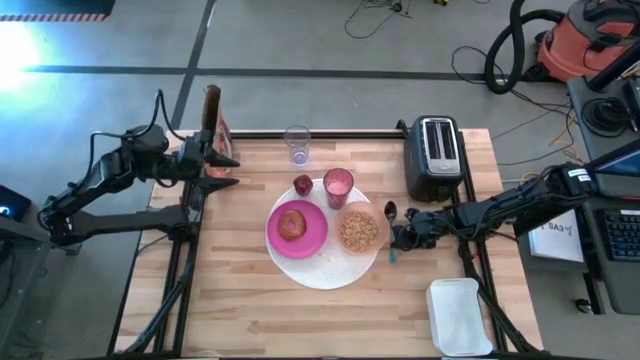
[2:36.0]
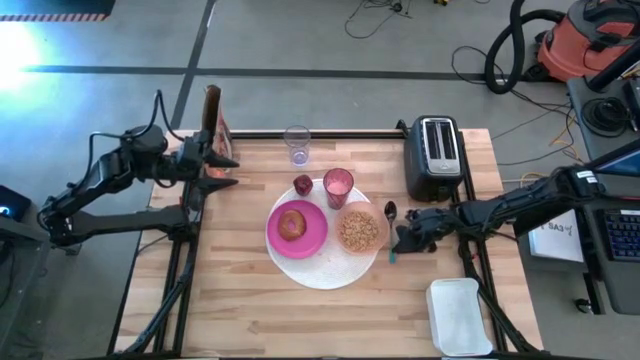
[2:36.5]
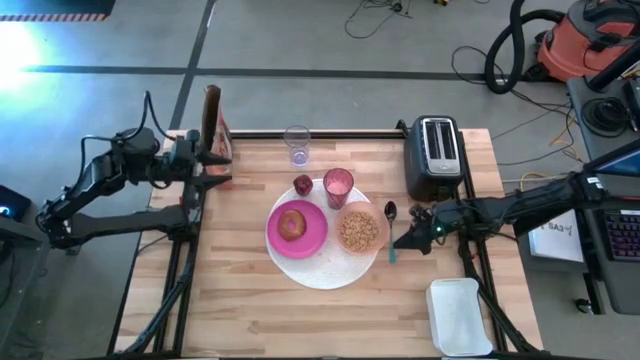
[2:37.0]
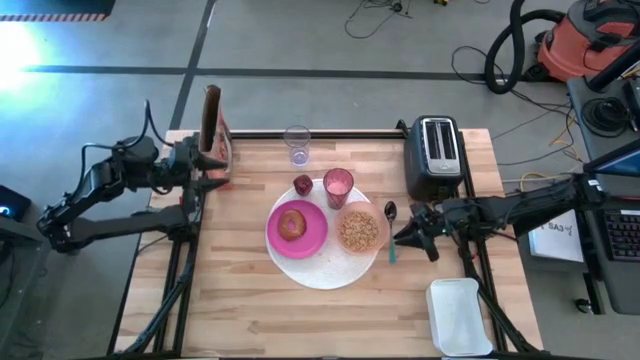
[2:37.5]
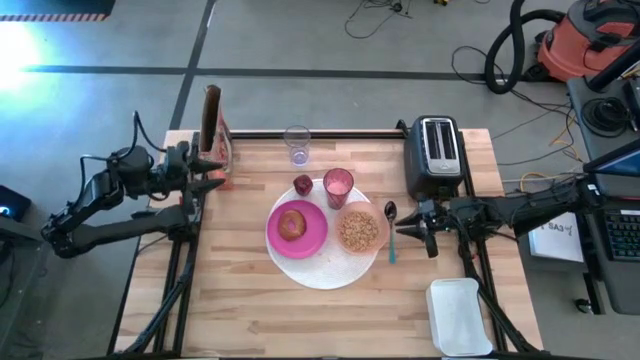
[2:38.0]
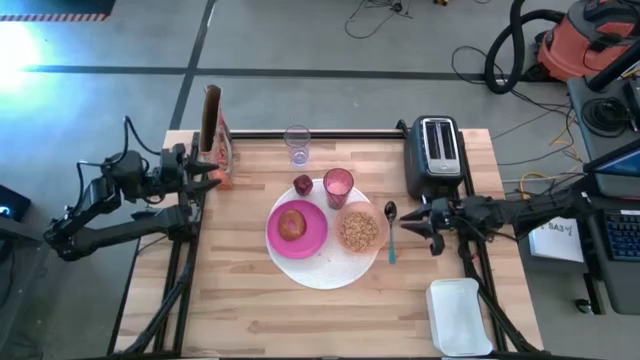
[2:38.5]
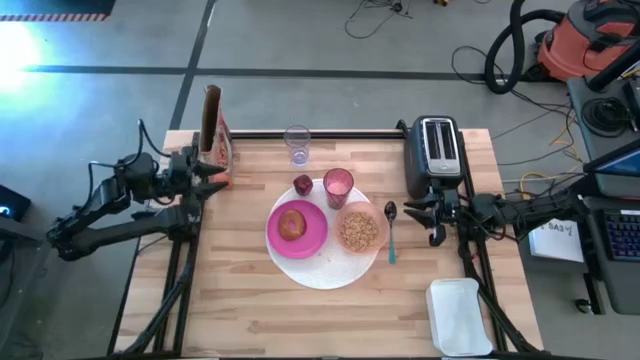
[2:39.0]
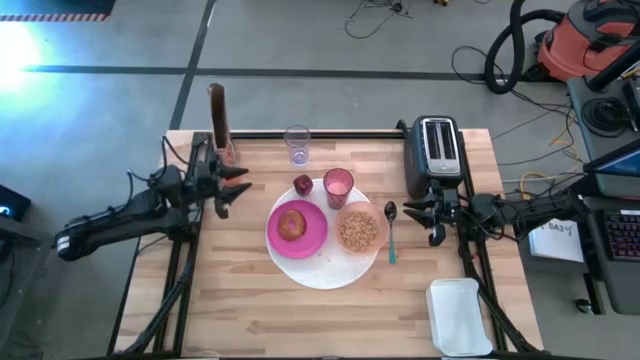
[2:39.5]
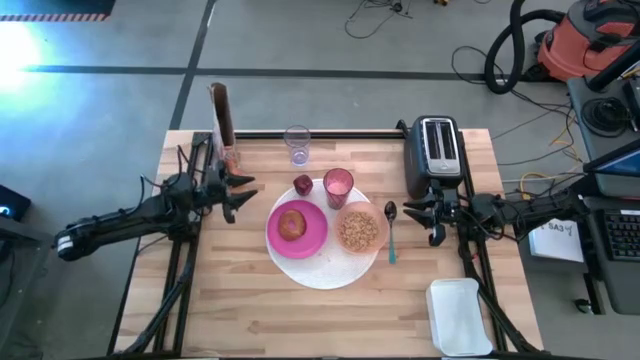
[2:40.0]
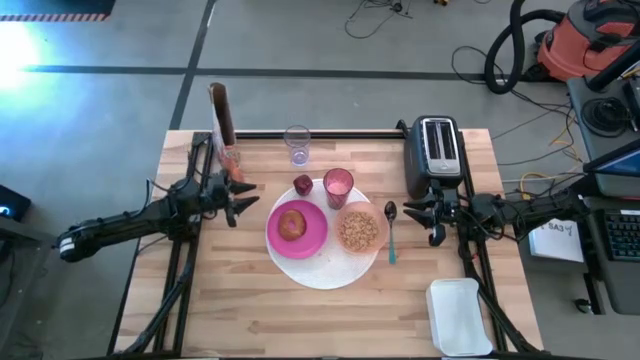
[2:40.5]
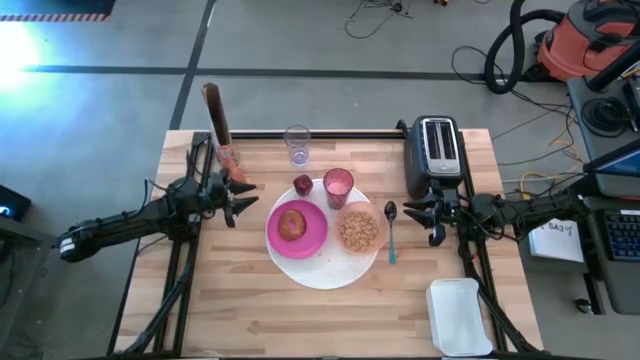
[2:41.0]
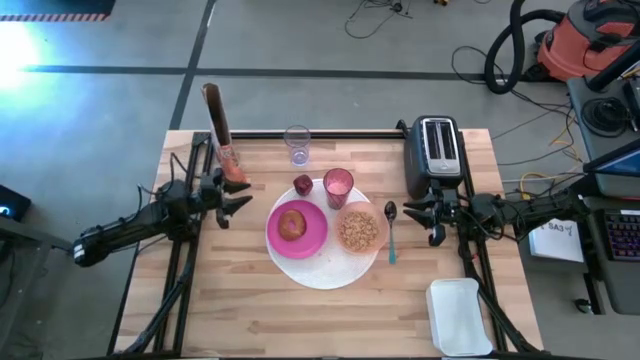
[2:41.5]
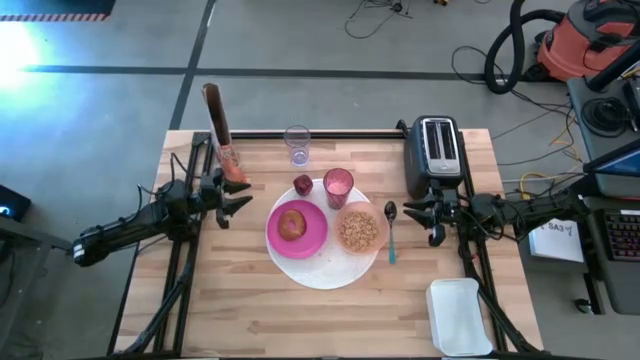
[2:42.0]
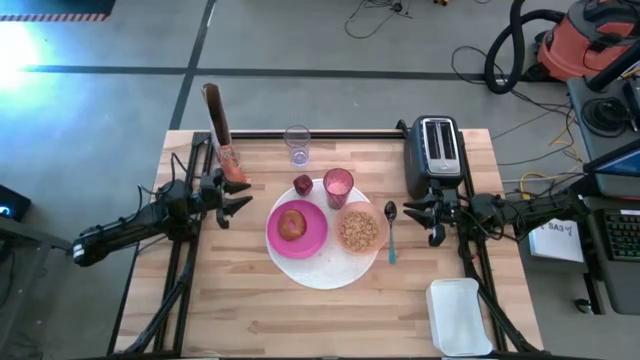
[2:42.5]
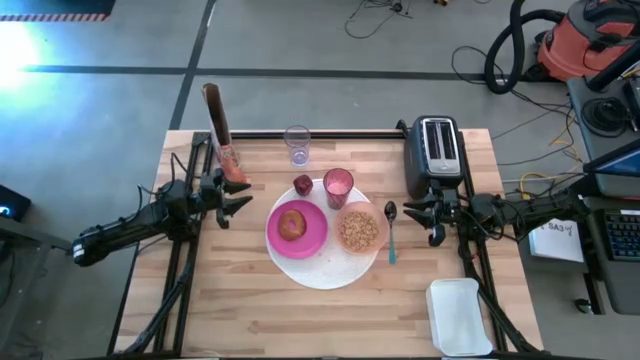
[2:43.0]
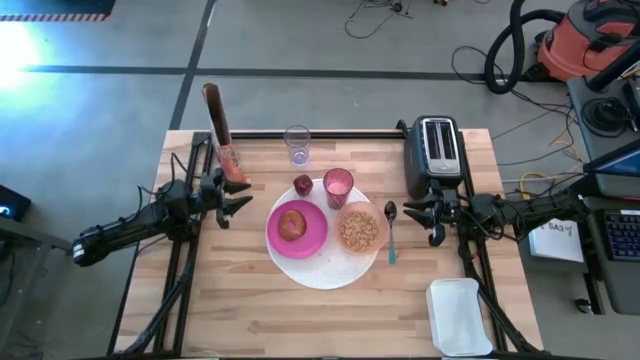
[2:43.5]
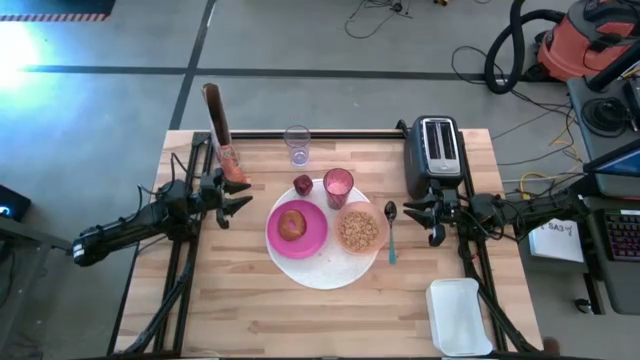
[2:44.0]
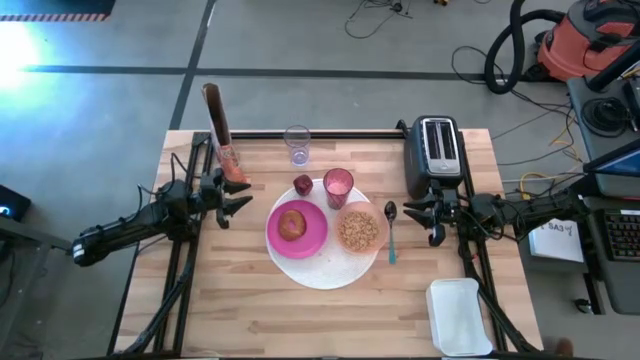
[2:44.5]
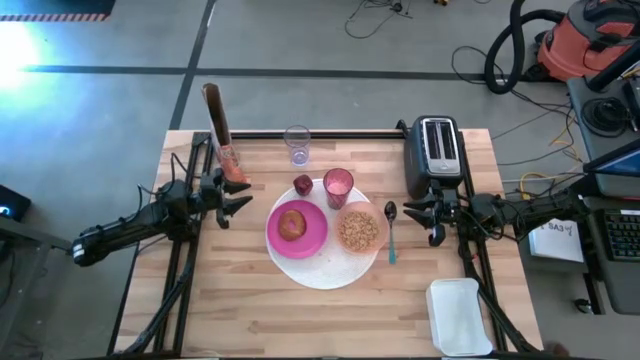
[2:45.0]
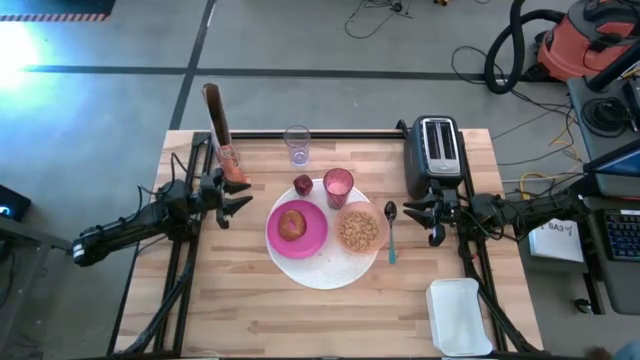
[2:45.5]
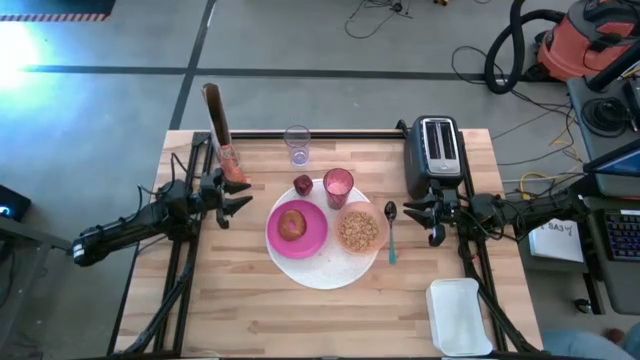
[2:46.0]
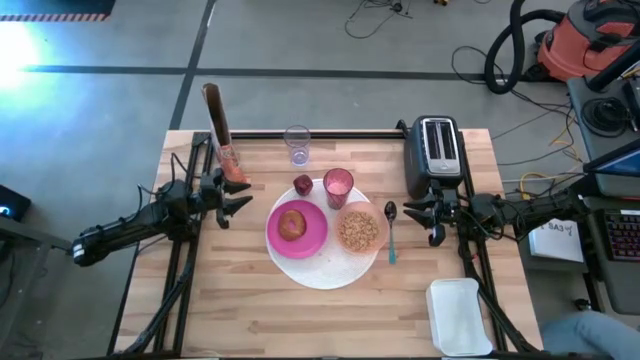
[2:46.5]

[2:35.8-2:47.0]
Task: Arrange a breakfast setting
Return to Home Position

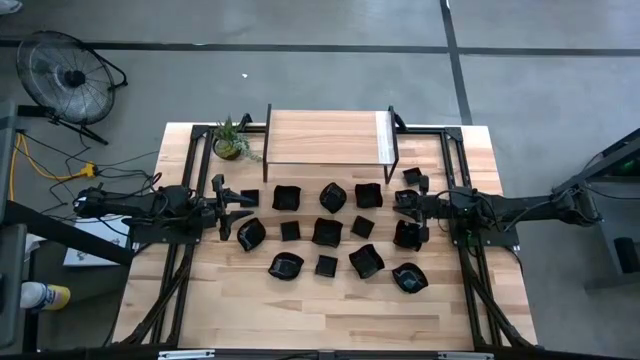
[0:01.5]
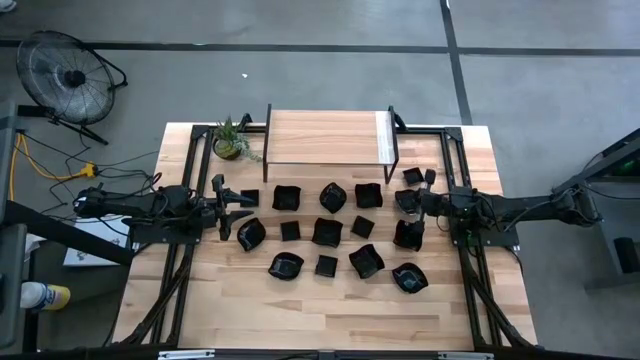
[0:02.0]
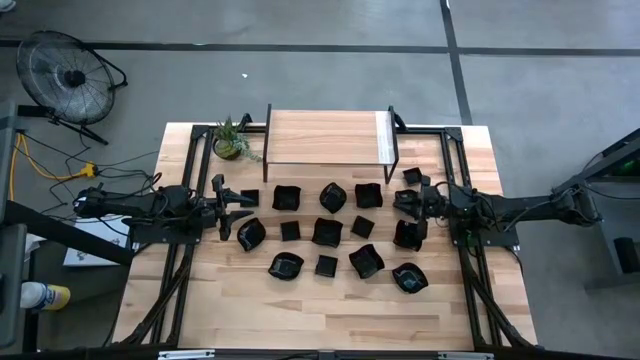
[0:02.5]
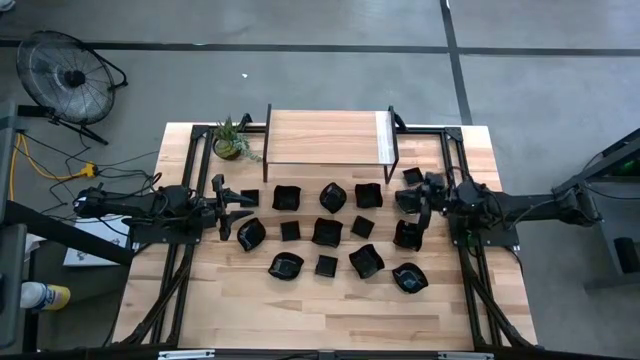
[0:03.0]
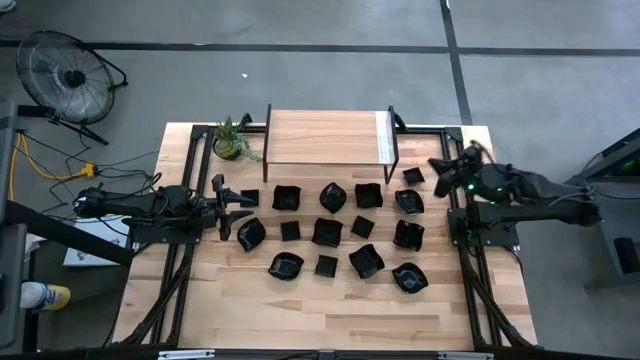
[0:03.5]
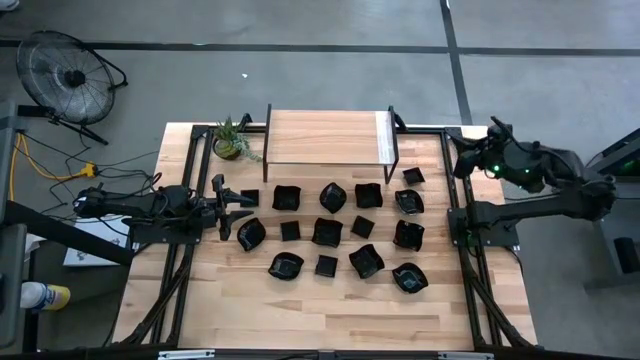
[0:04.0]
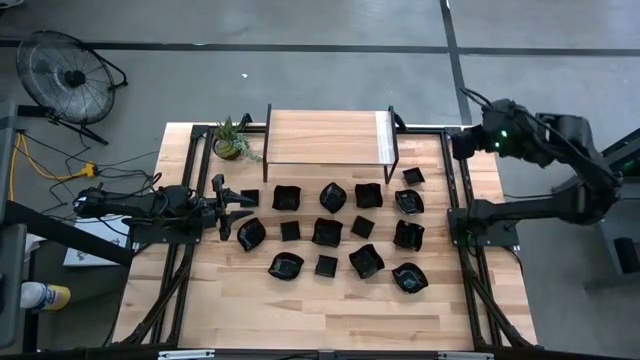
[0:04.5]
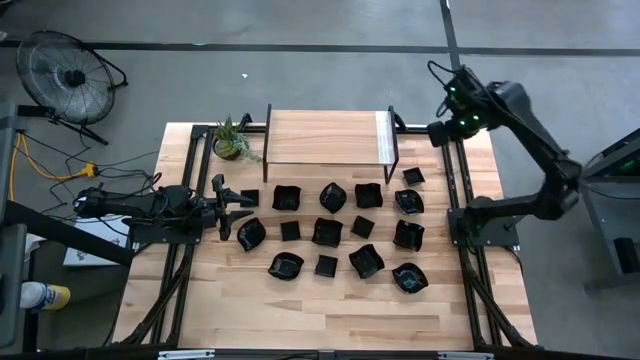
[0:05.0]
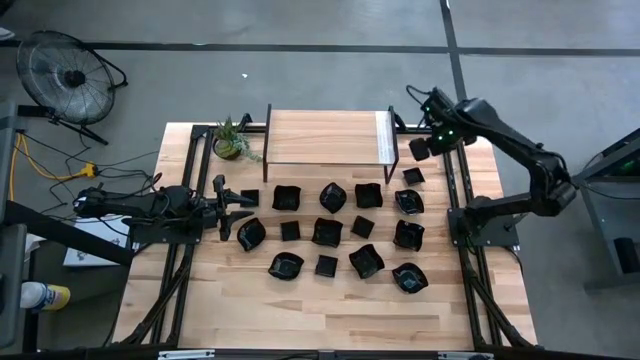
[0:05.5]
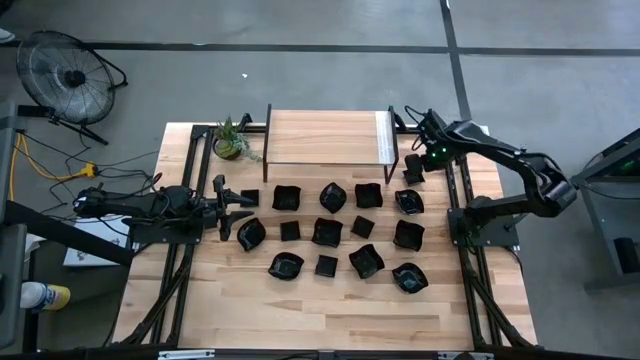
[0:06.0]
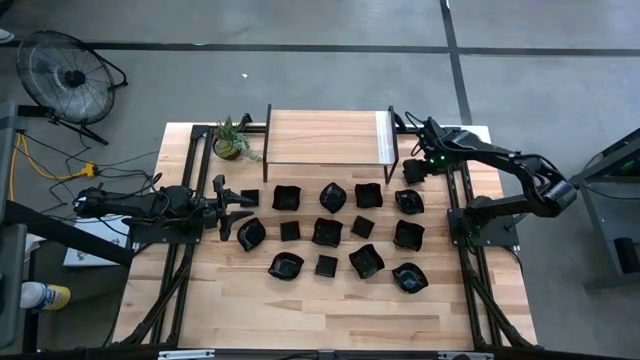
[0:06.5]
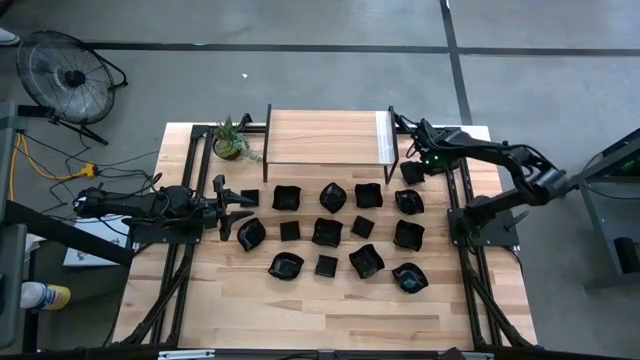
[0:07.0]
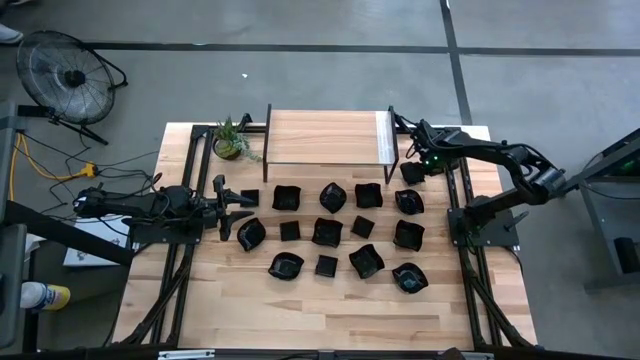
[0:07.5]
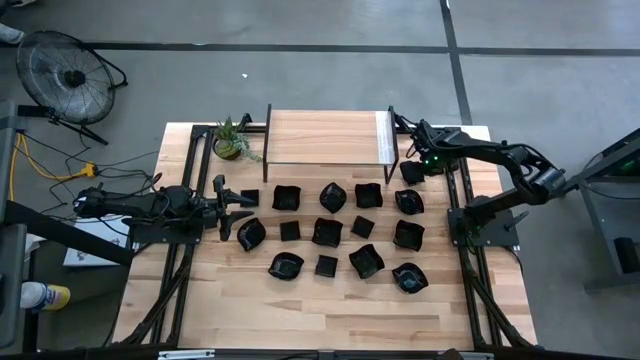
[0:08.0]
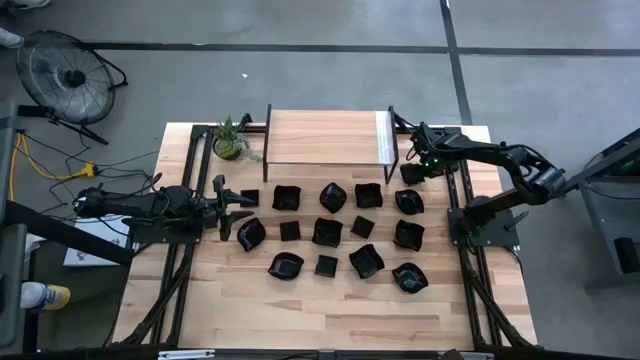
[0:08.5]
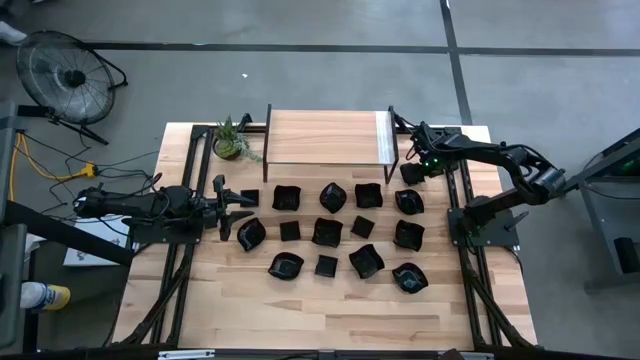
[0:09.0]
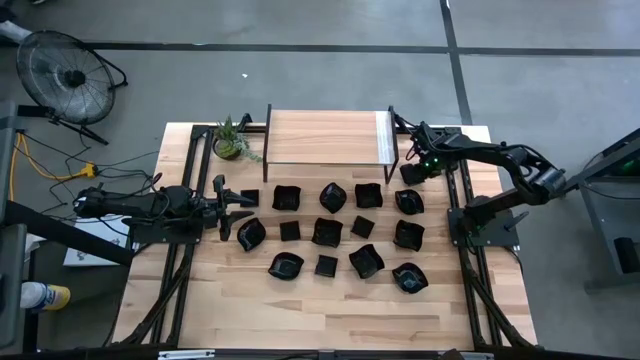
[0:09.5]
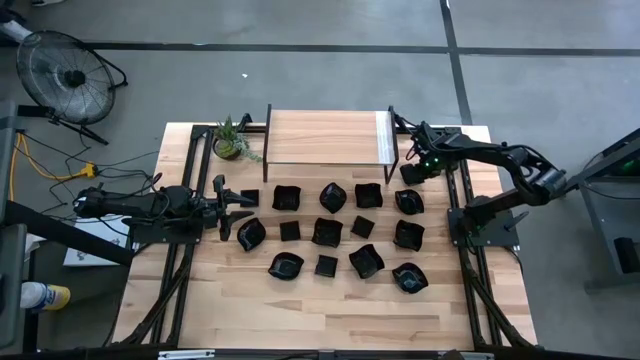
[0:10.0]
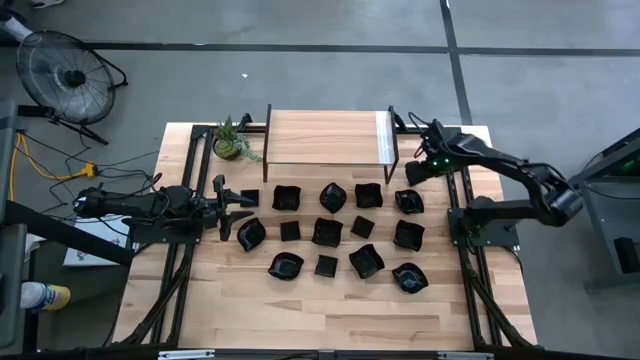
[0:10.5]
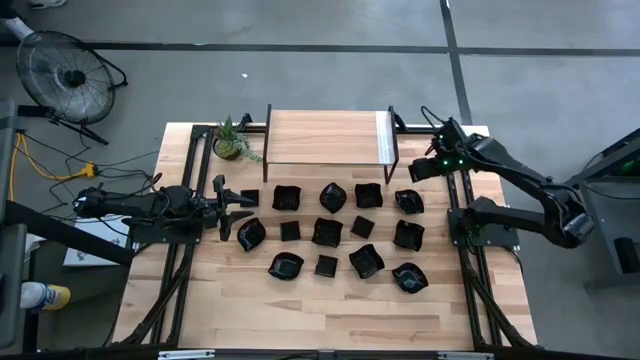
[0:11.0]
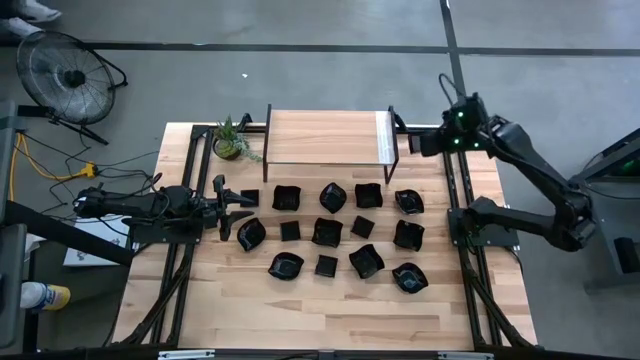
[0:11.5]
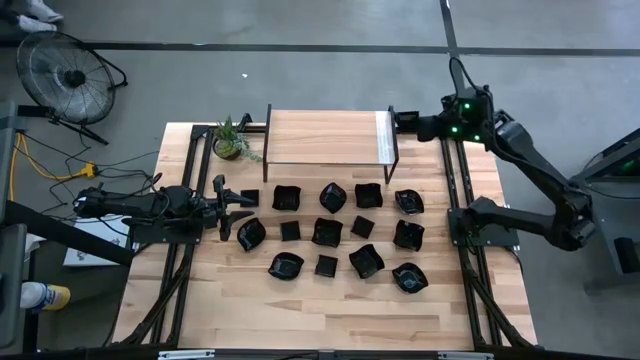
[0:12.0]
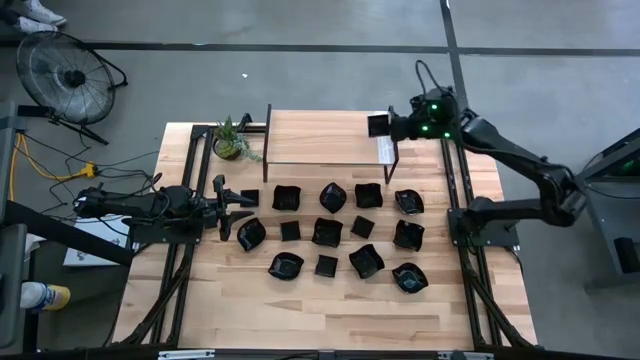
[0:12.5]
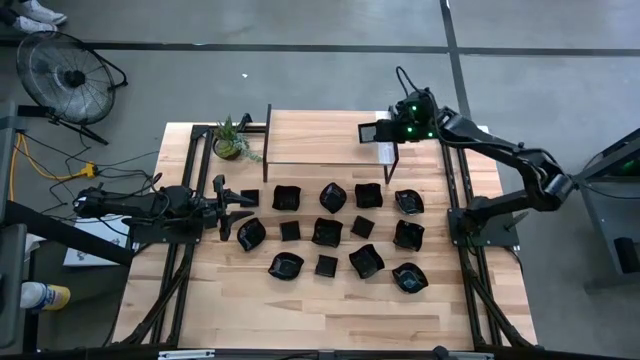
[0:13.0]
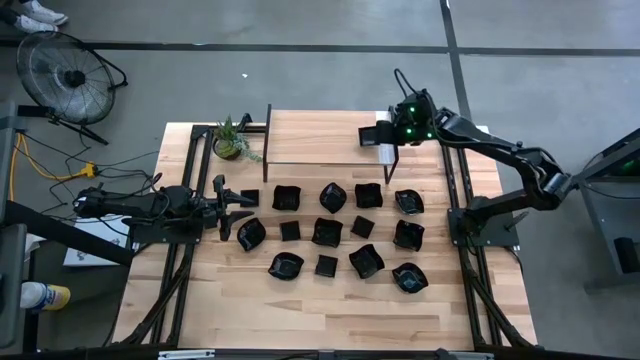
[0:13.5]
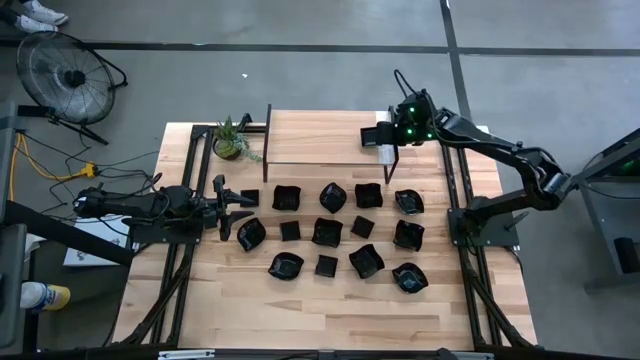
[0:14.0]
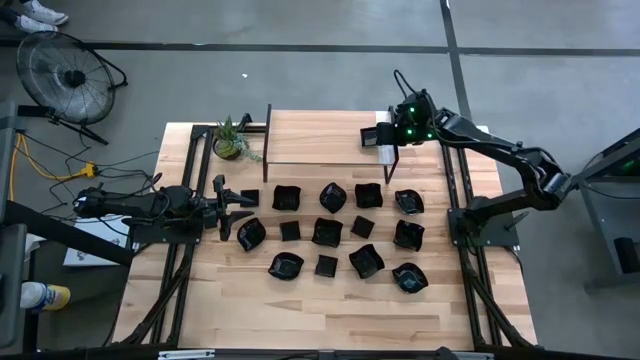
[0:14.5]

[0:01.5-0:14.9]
Task: Pick & Place Mini shaped plates
Put the black square plate on the shelf
